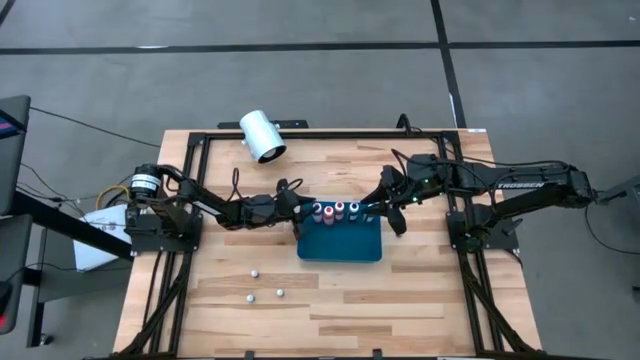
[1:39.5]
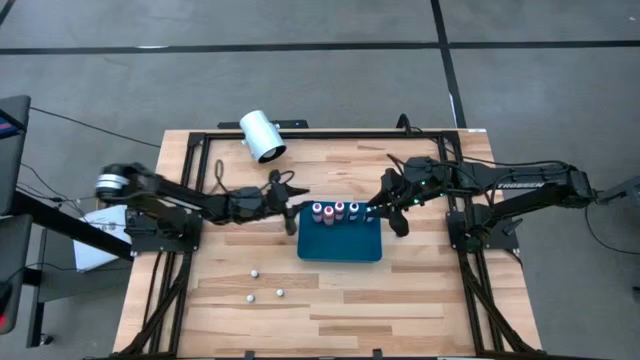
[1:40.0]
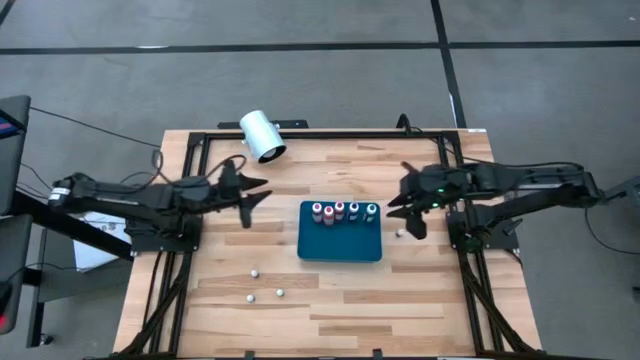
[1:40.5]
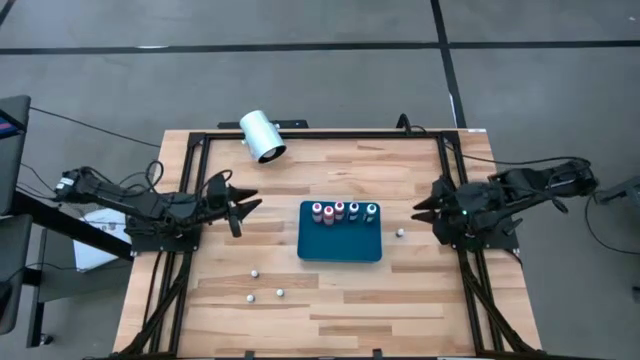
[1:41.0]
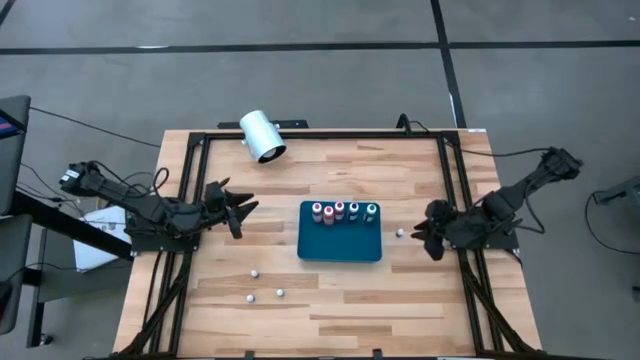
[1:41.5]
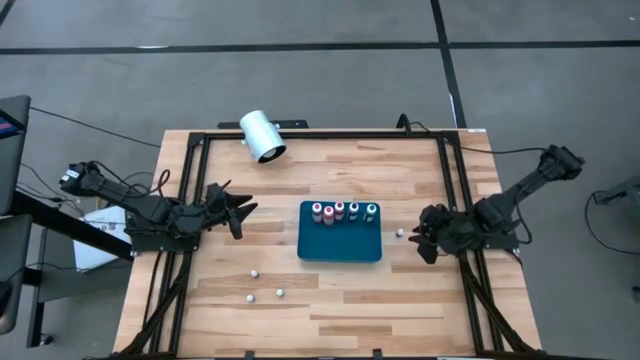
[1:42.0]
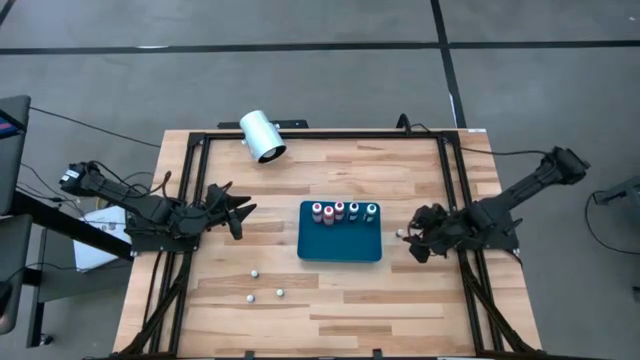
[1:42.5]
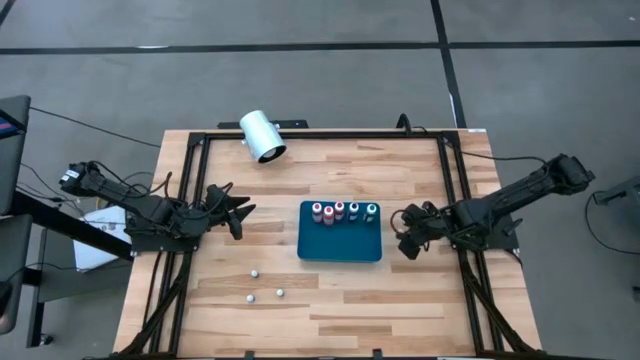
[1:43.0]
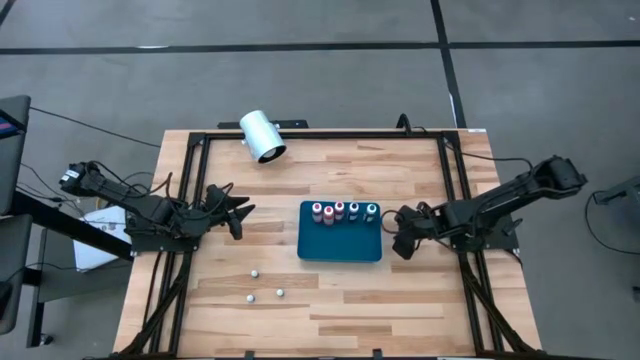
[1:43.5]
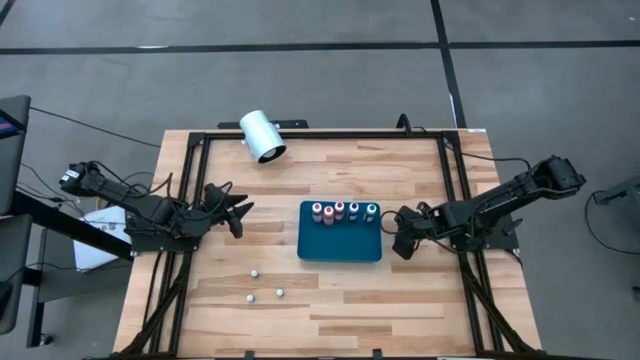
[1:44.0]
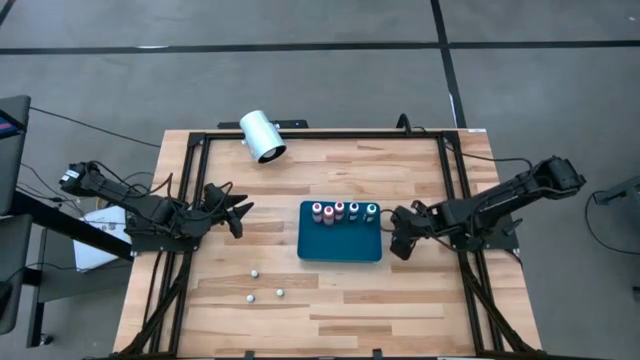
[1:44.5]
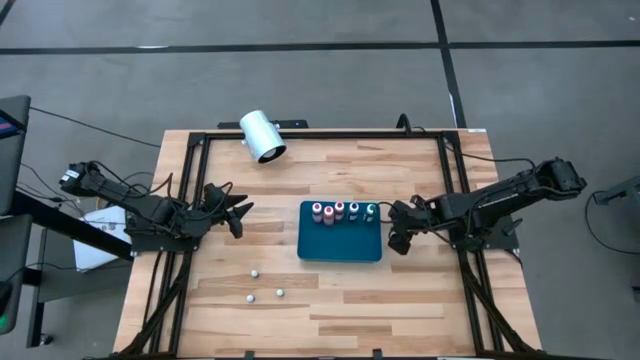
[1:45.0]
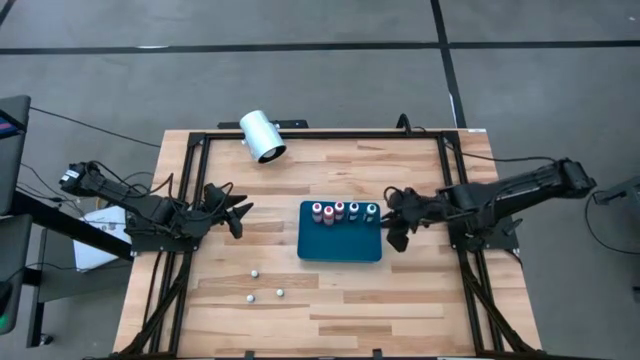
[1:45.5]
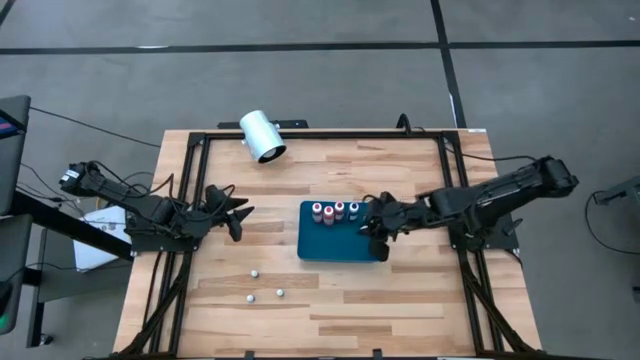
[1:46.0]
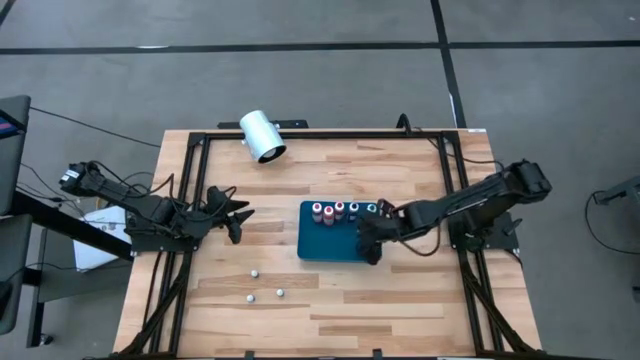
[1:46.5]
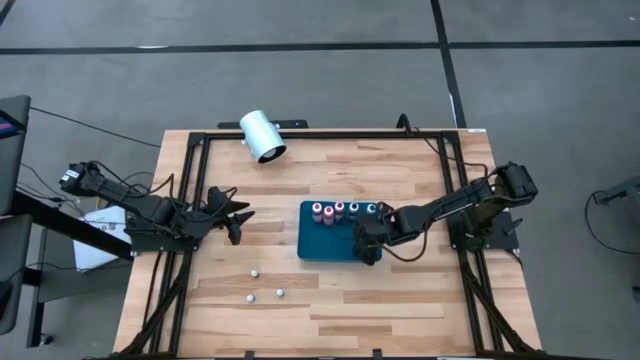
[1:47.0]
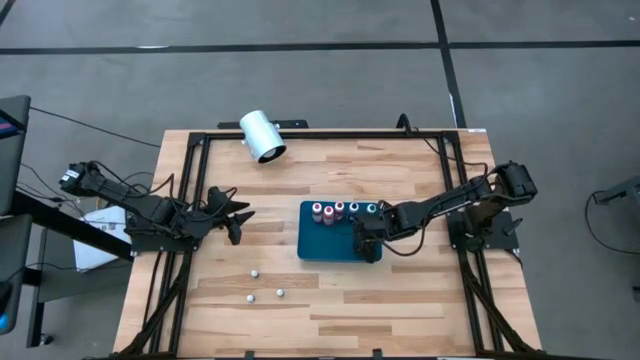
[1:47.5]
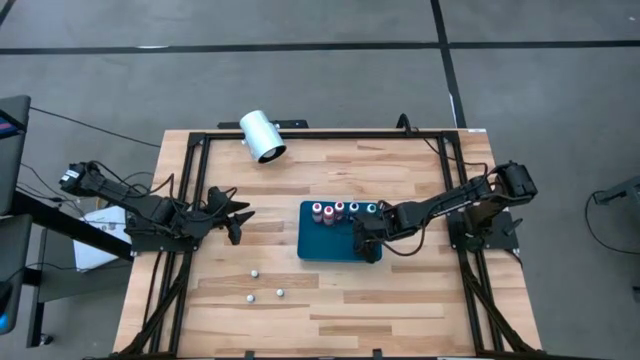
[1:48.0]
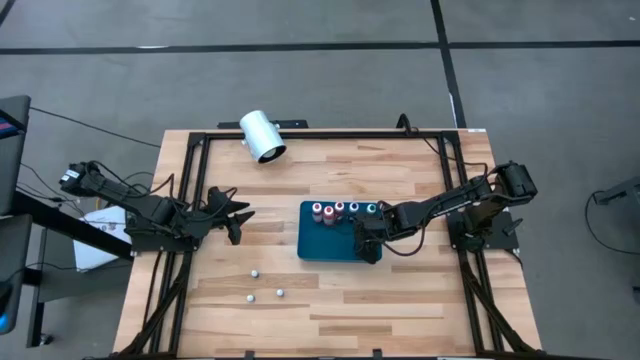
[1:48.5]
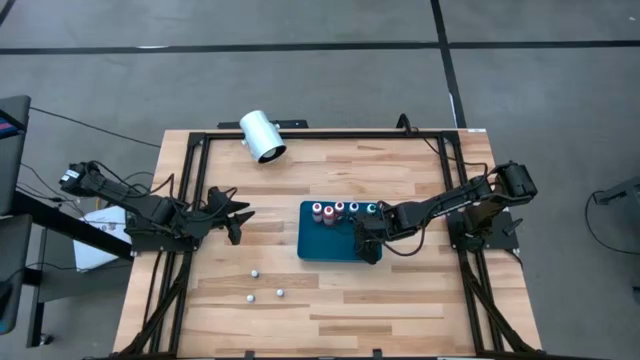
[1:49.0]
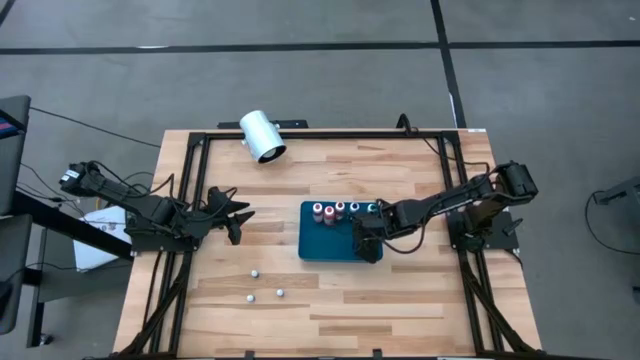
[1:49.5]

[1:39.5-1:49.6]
Task: Pick & Place food coloring
Put the small black food coloring bottle into the blue bin

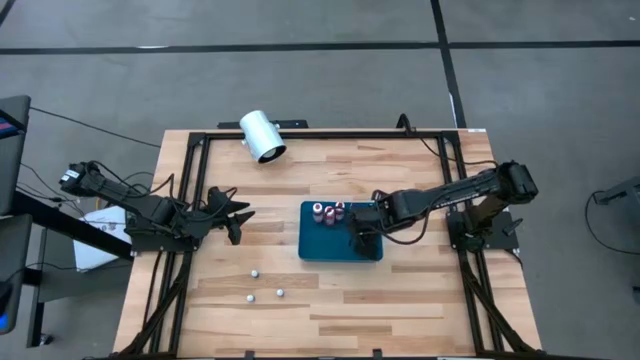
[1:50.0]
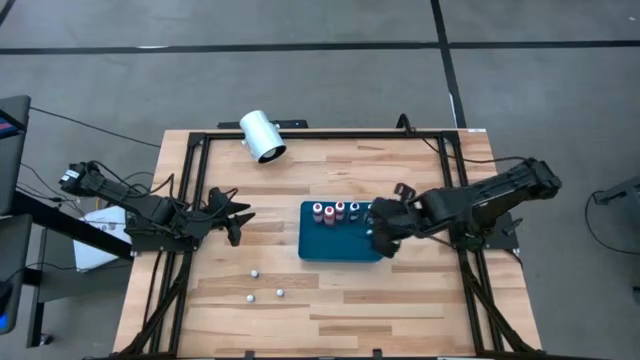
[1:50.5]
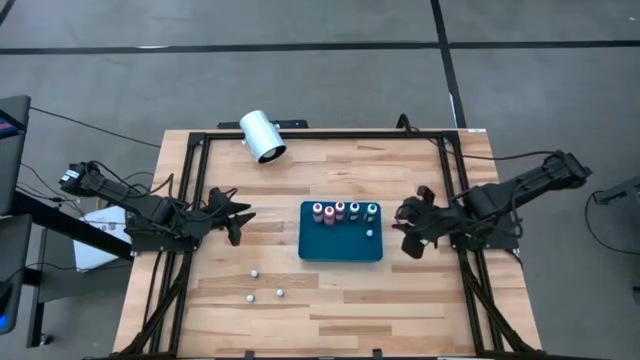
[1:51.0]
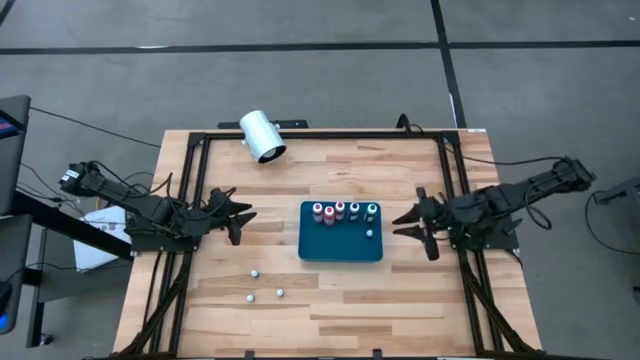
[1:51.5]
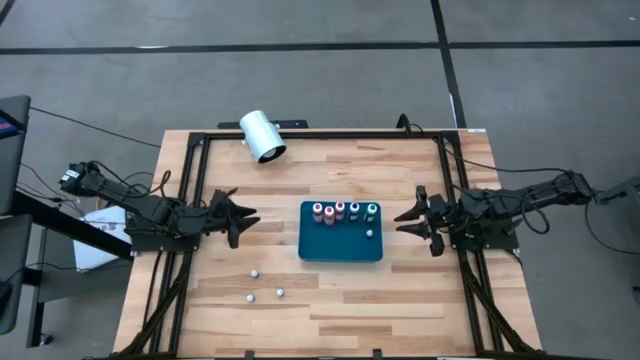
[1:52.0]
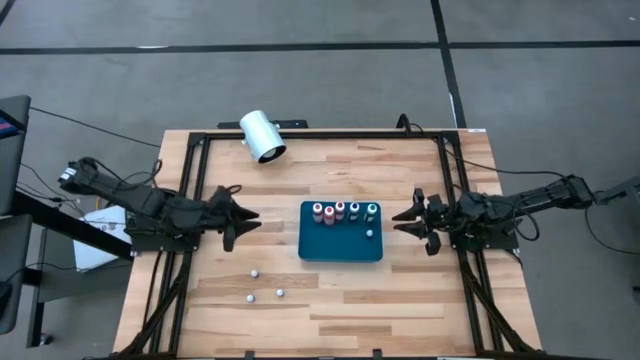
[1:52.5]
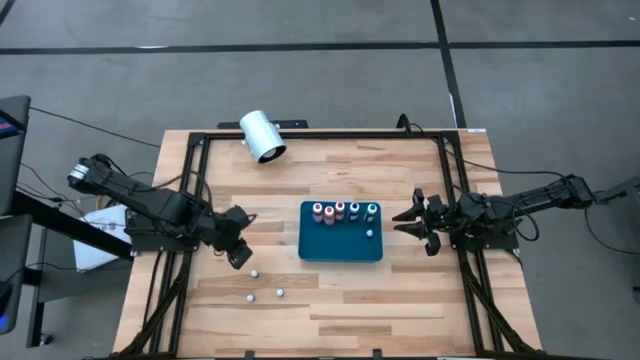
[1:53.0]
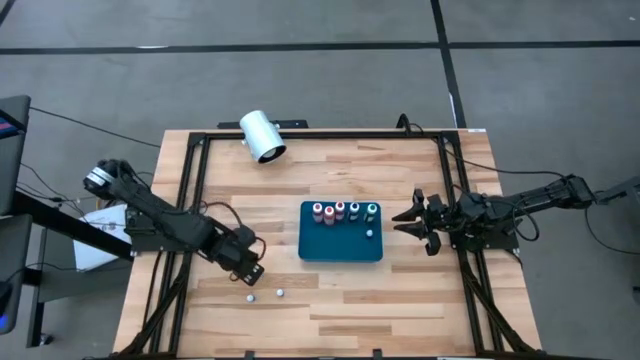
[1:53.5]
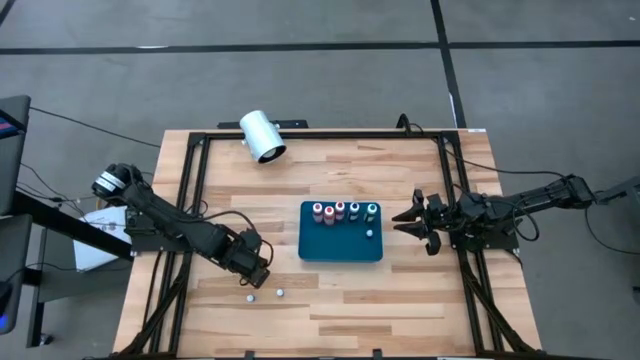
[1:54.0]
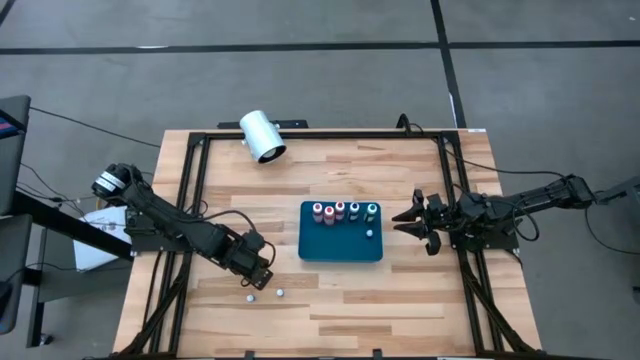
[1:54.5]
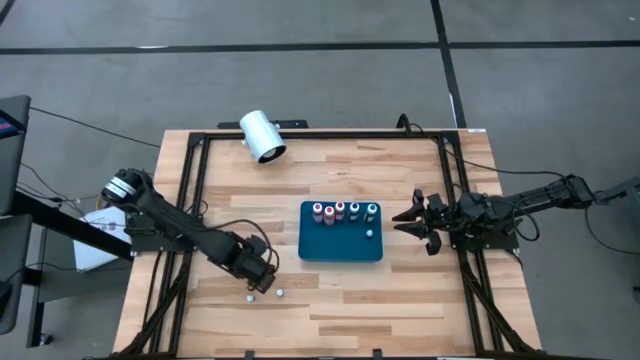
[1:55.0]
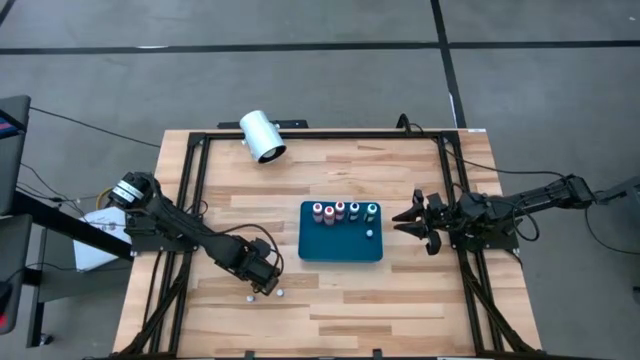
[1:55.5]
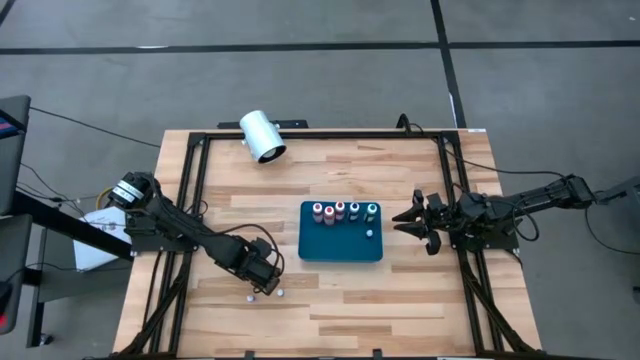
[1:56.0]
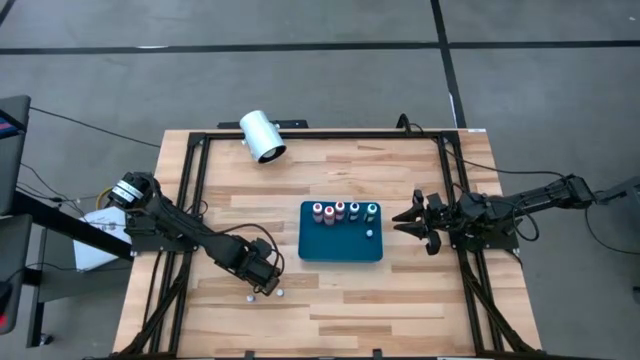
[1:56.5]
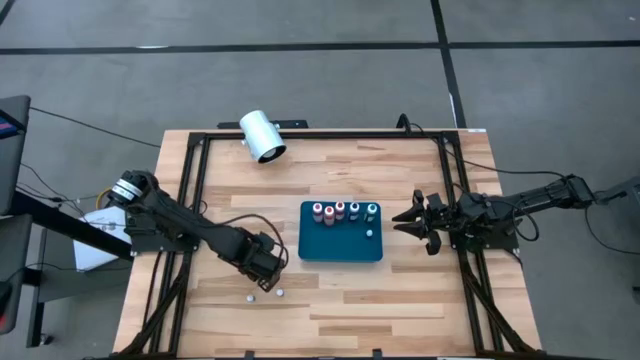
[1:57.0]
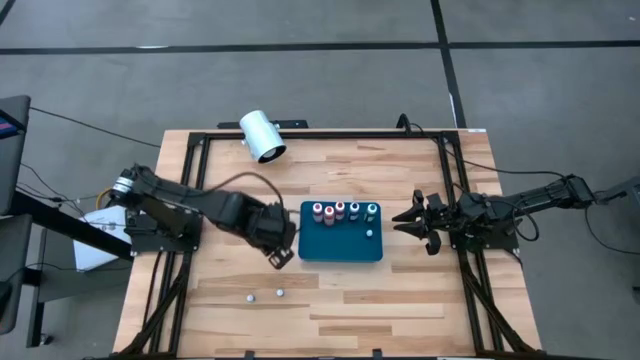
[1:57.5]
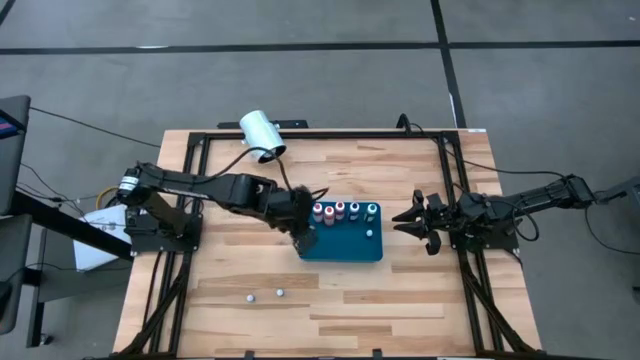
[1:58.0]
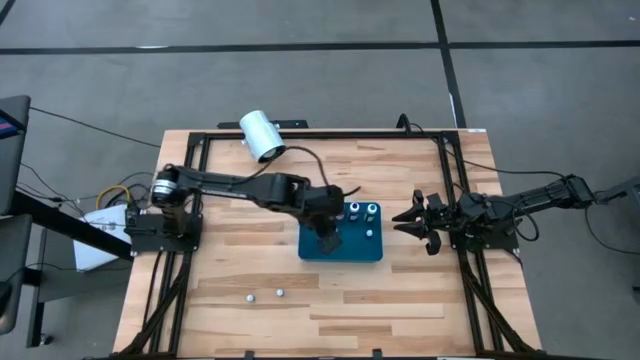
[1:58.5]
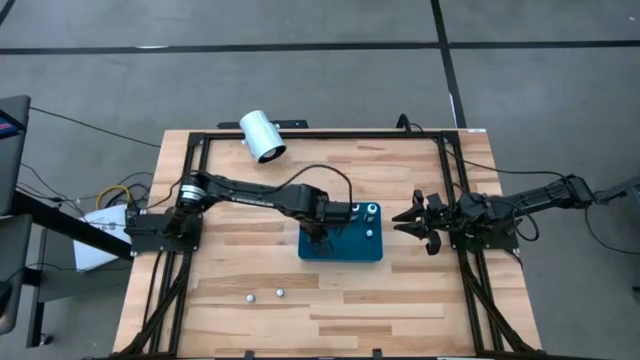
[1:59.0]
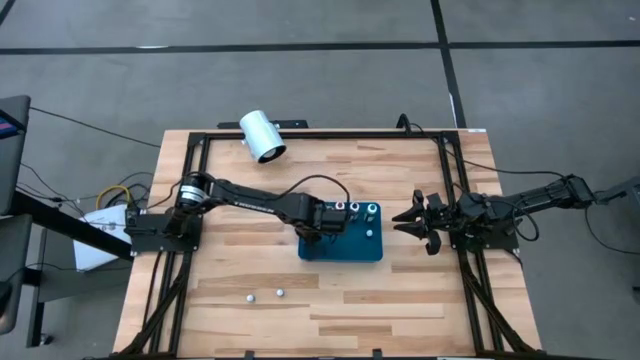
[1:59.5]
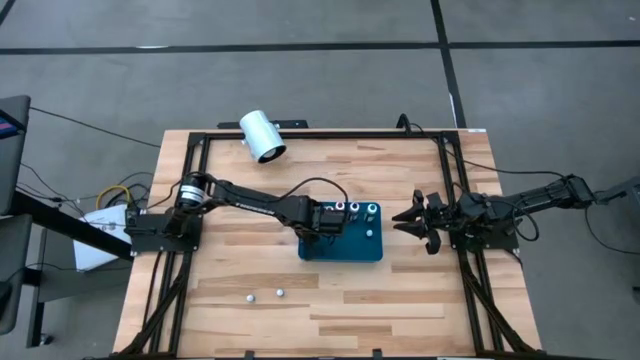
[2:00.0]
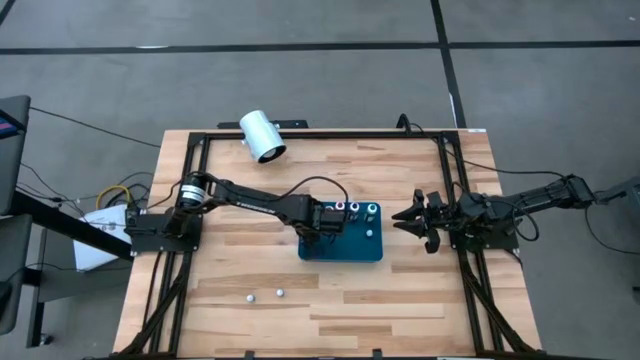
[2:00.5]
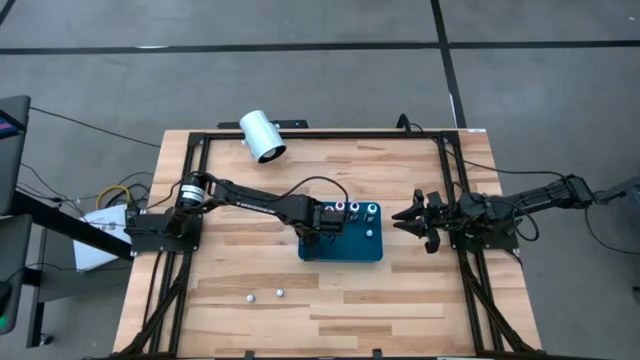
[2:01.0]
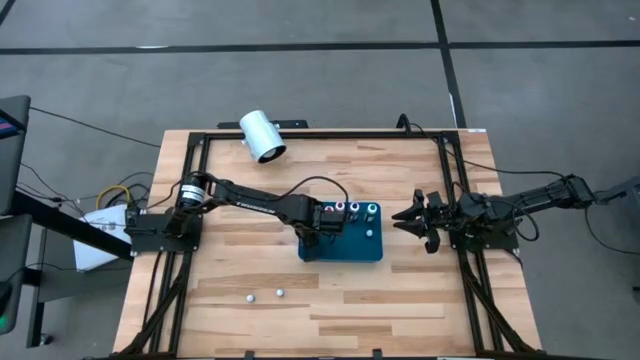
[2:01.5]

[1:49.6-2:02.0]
Put the small purple food coloring bottle into the blue bin
